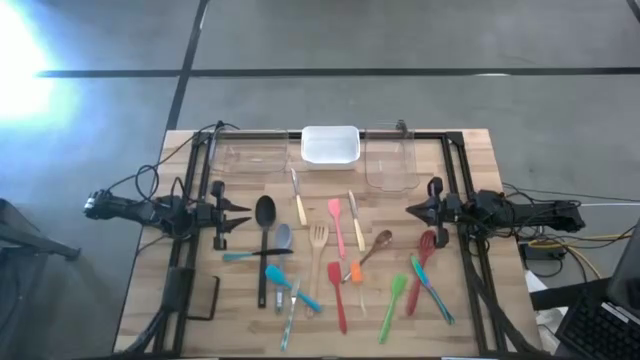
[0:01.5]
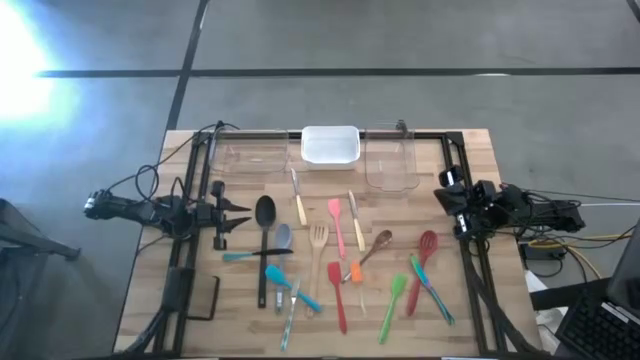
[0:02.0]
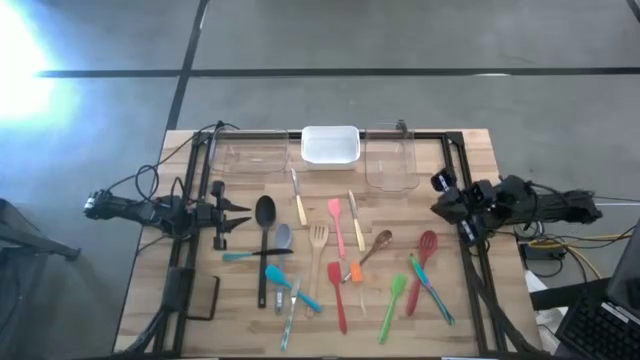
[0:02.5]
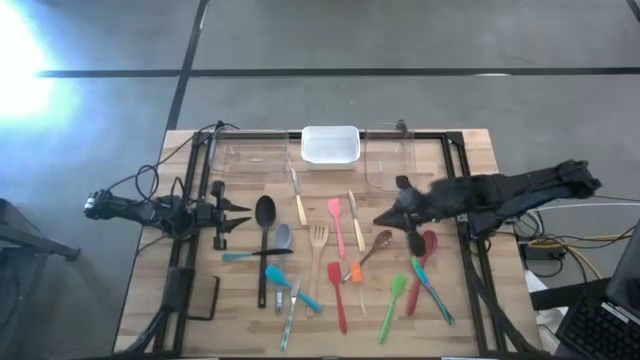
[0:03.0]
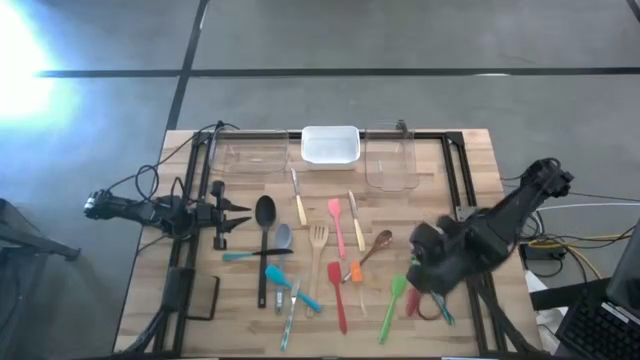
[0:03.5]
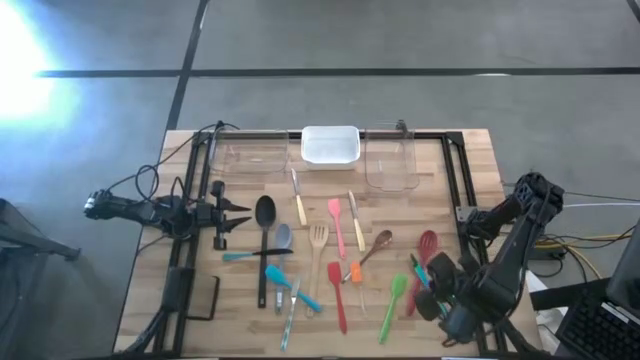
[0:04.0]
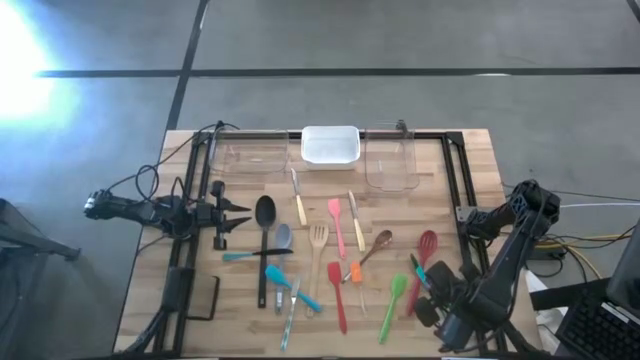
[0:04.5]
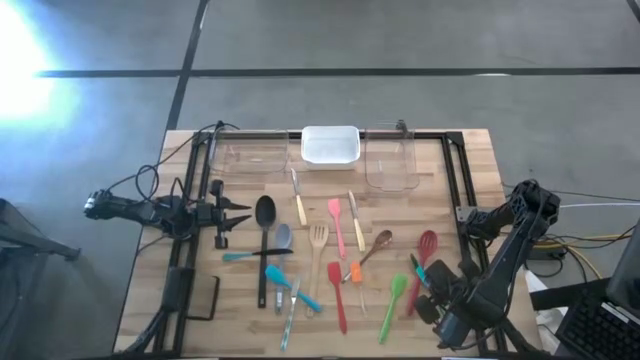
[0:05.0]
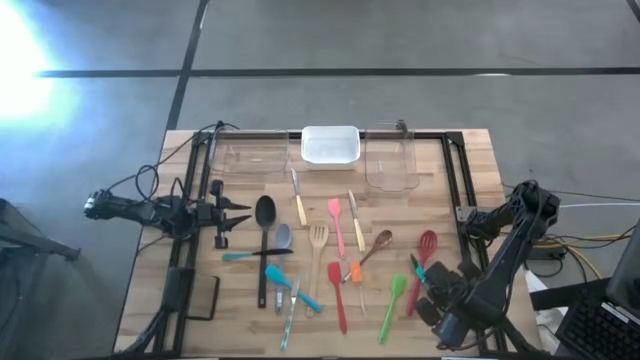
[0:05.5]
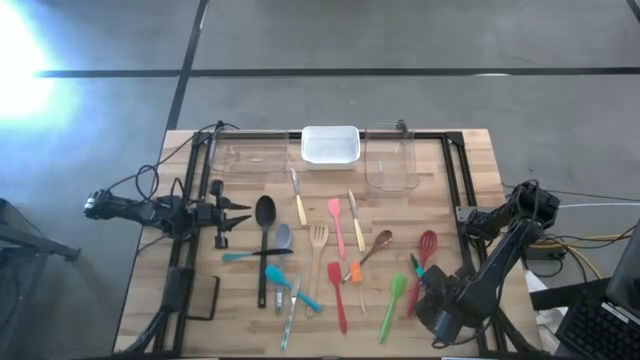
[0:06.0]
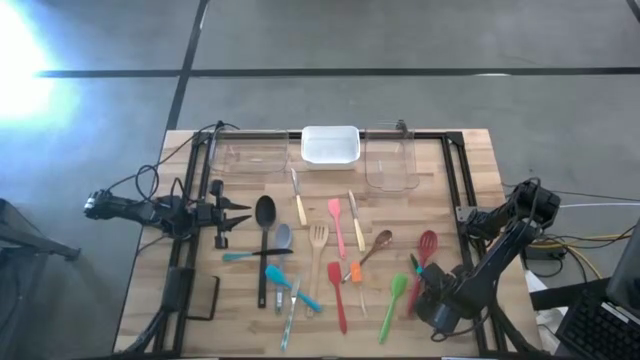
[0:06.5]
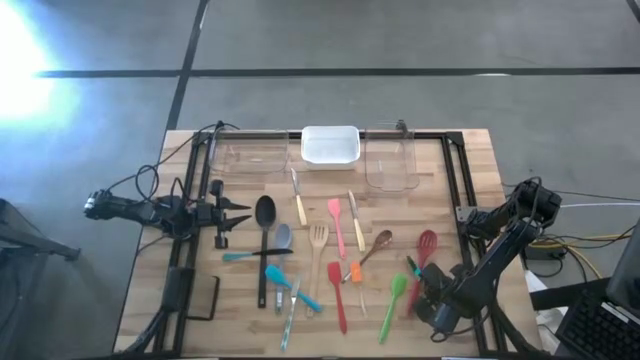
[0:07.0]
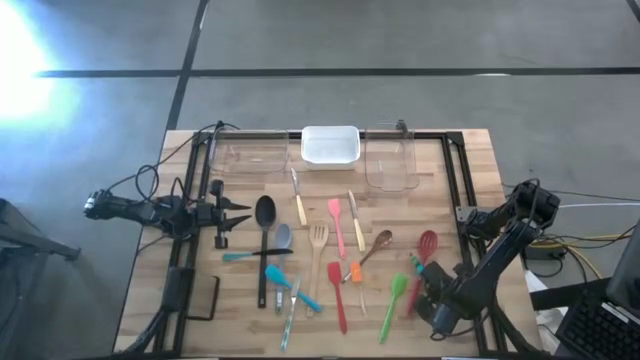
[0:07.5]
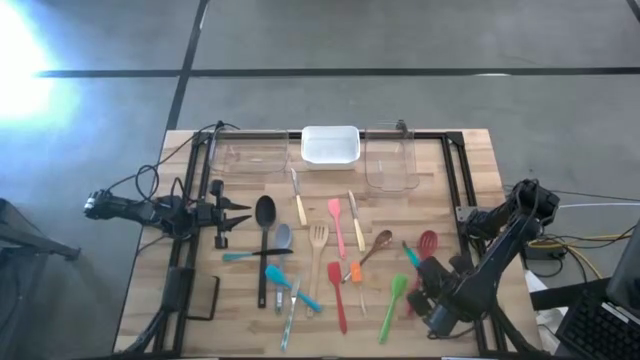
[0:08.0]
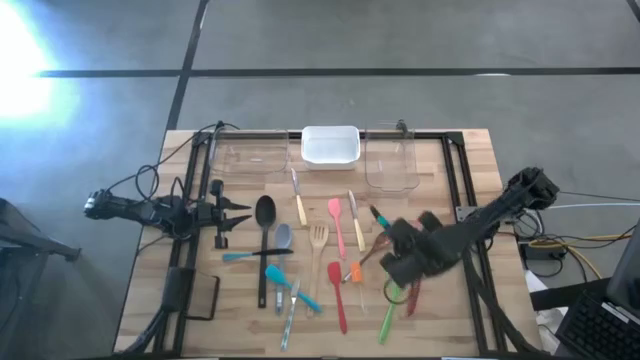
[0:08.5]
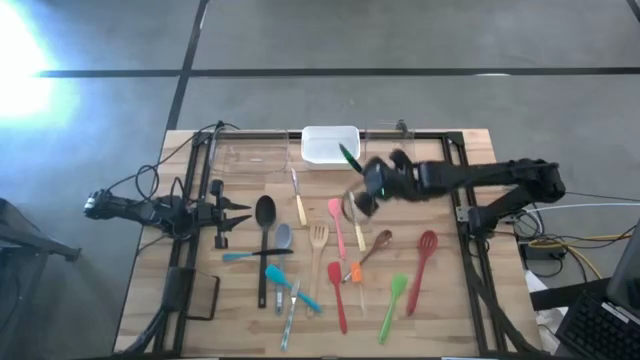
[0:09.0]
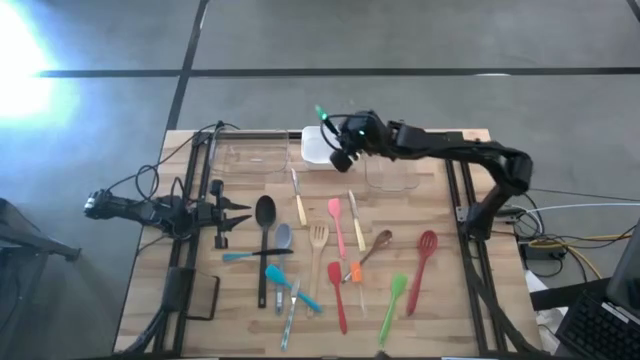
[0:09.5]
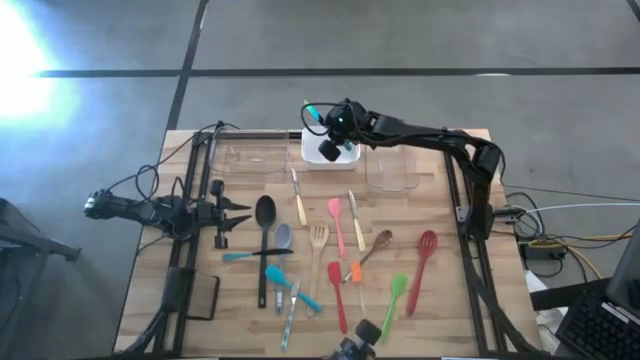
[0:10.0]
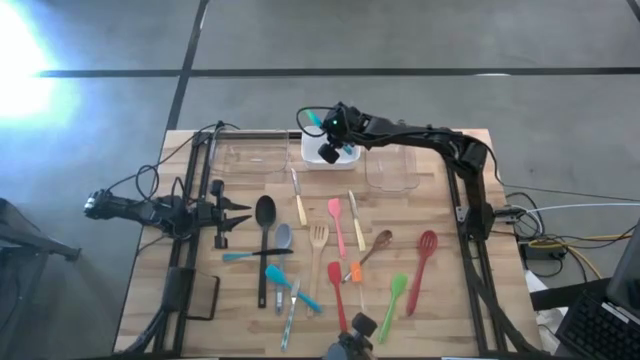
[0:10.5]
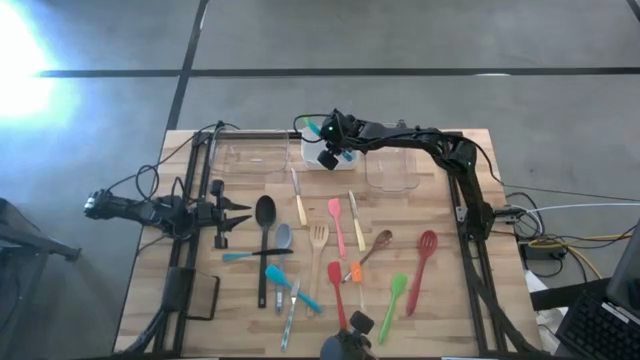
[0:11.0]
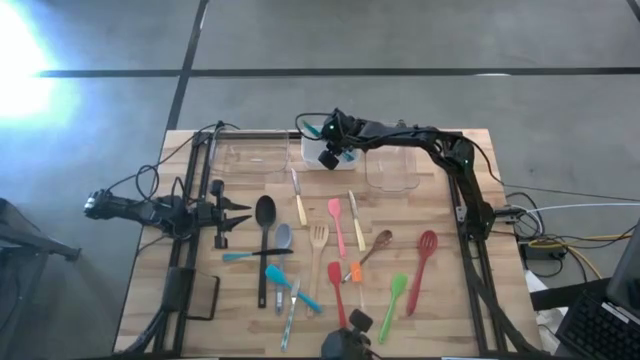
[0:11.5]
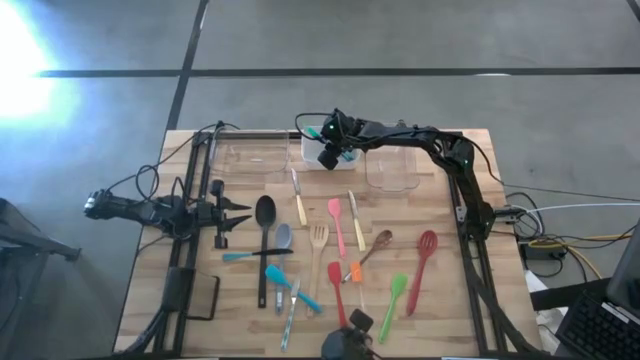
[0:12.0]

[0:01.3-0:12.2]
Task: Pick & Place Kitchen Items
Put the iridescent knife into the white bin

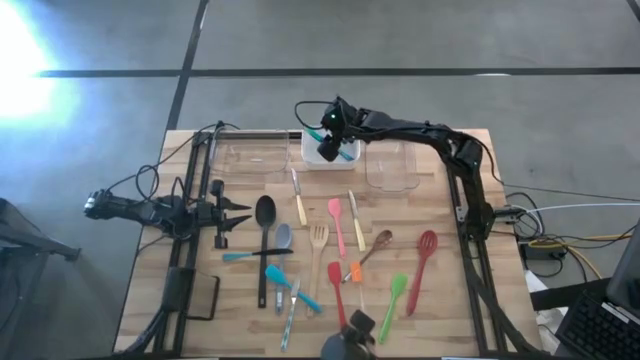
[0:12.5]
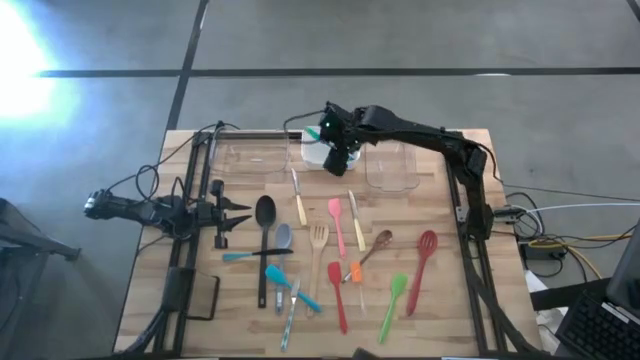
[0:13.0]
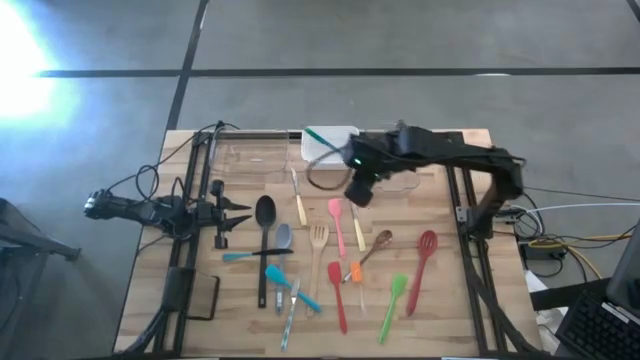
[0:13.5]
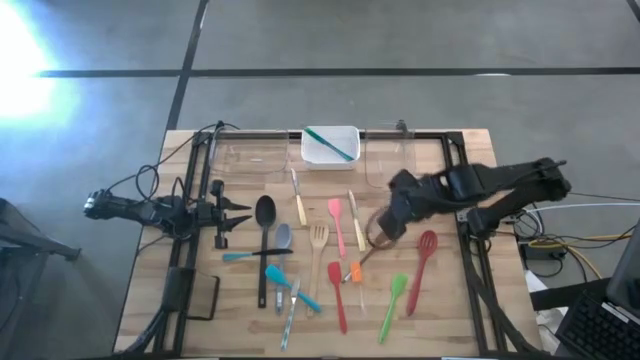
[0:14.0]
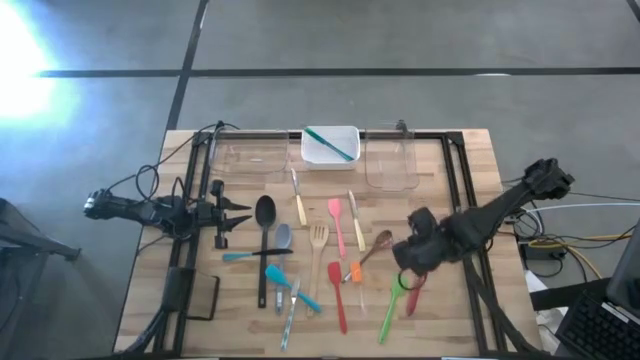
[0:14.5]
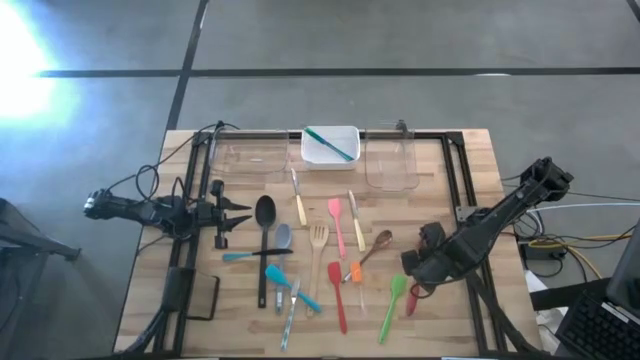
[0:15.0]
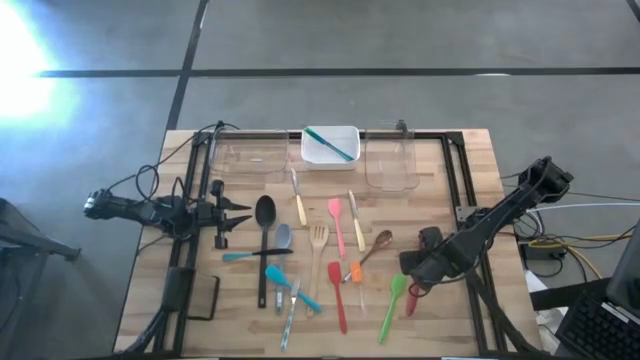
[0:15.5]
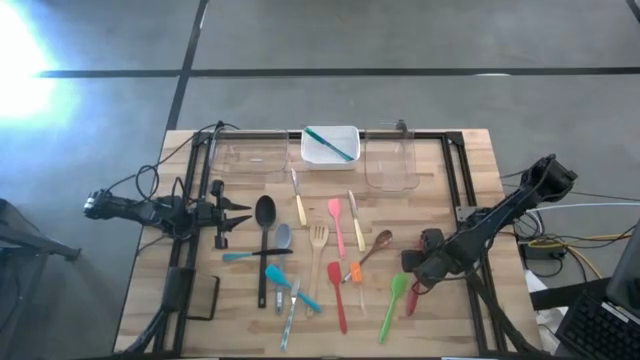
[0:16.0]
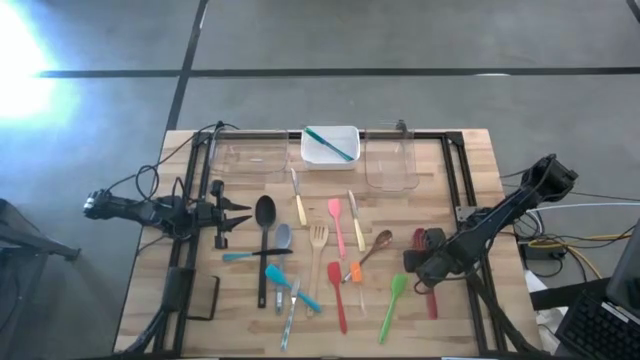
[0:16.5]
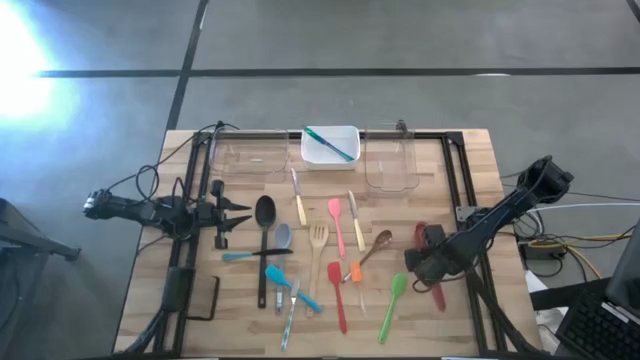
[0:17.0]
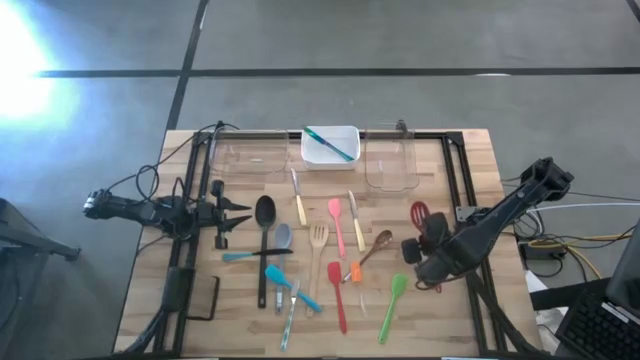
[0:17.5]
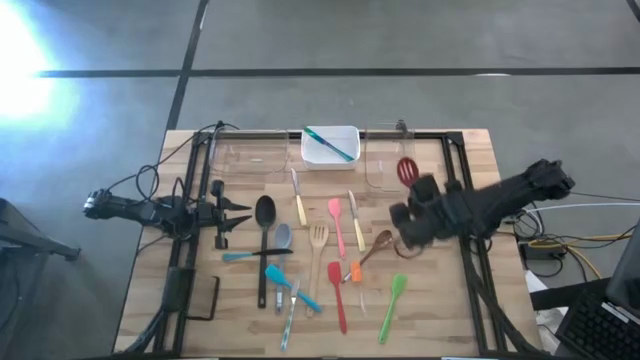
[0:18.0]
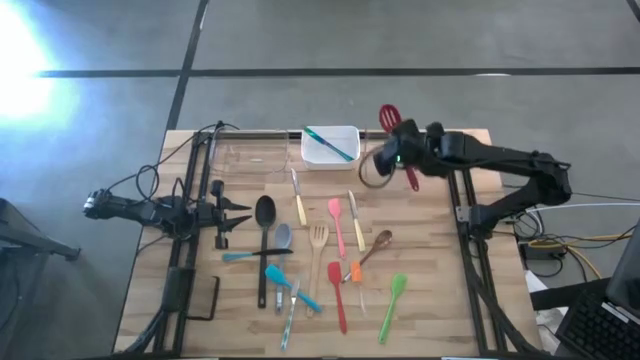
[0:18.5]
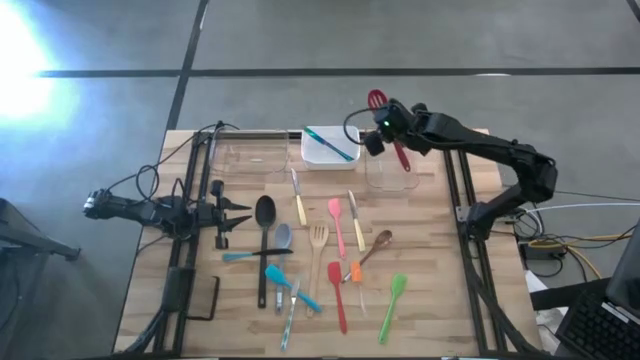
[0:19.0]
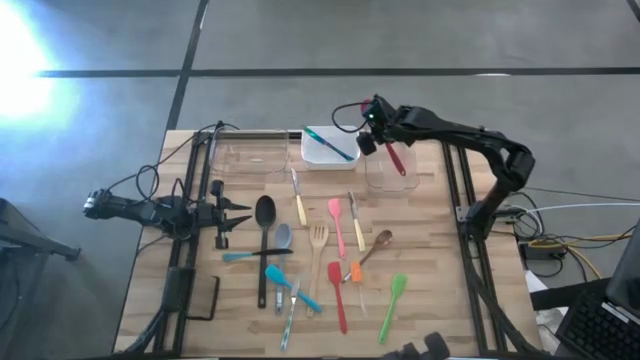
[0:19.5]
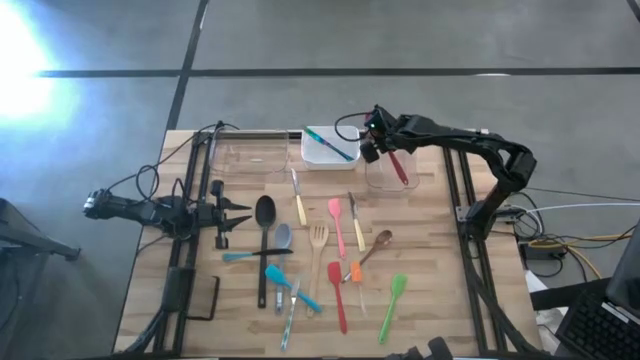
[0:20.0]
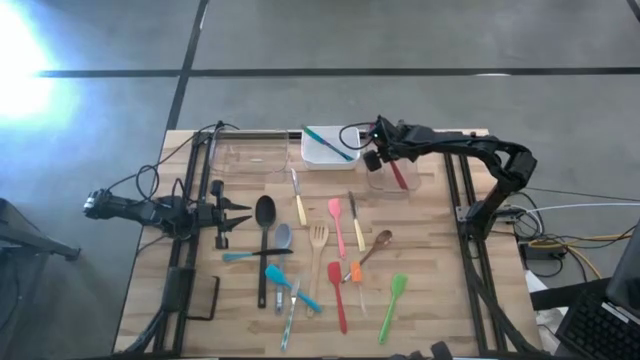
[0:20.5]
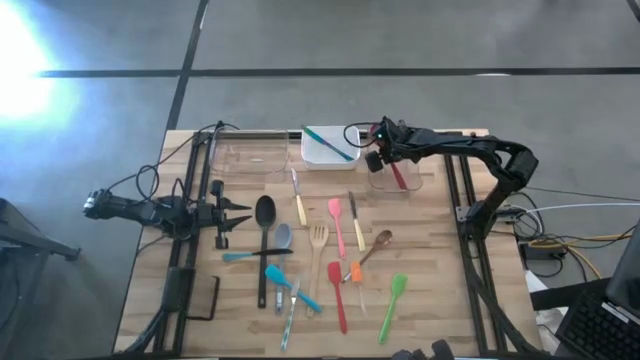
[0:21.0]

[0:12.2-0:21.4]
Put the red ladle into the right transparent bin

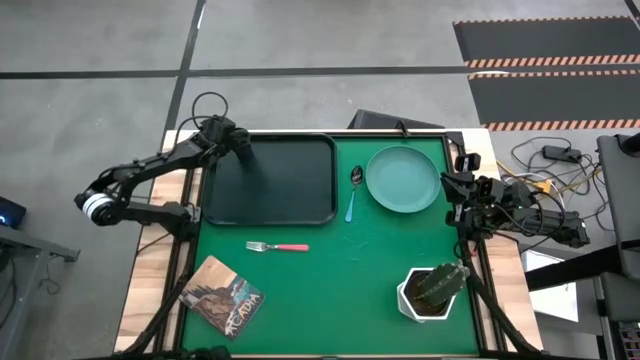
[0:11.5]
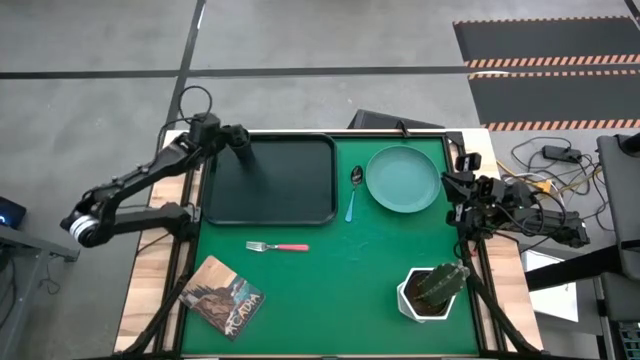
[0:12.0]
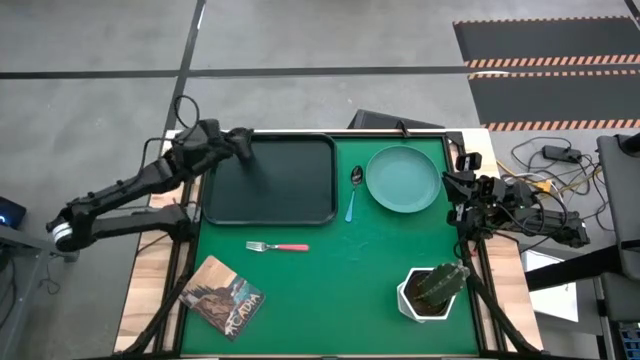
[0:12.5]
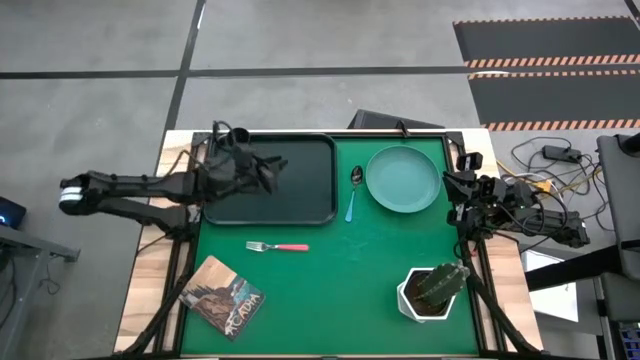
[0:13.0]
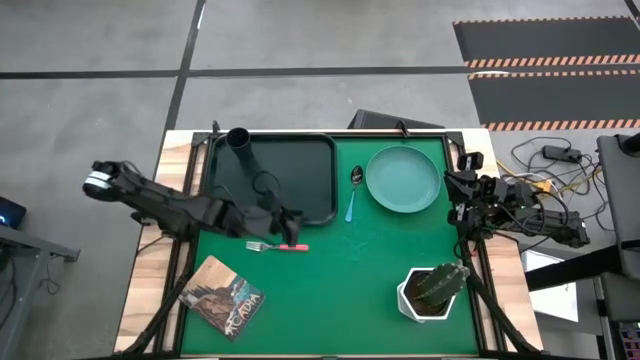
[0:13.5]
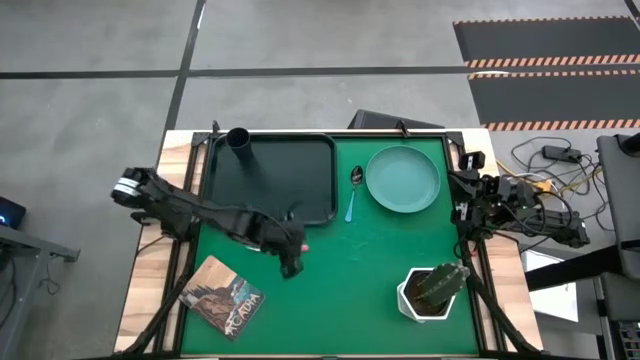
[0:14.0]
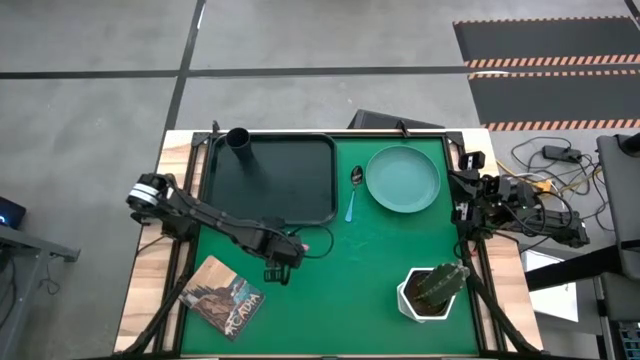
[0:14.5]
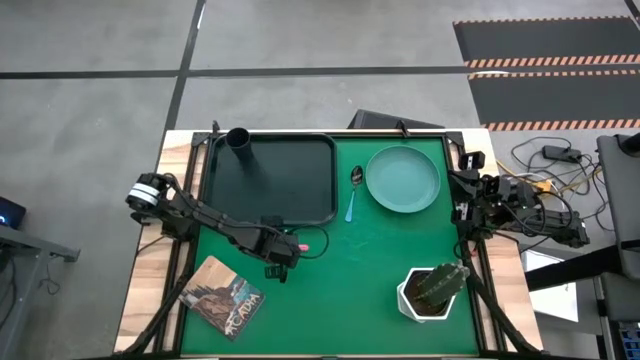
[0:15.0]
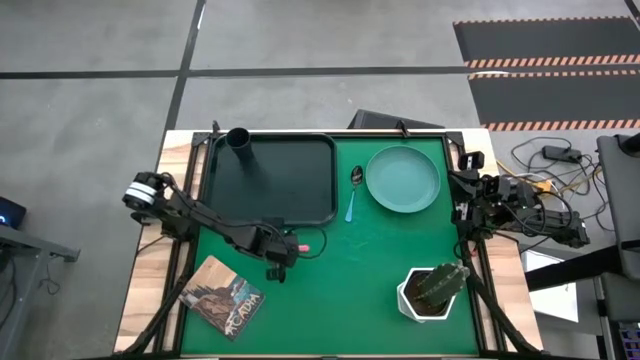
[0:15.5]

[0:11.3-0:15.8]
Task: Pick and place plate/cup/fork/spoon on tray
Put the pink fork on the black serving tray to the bottom of the black cup
